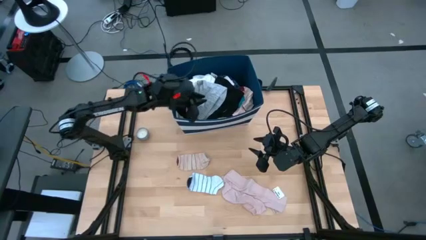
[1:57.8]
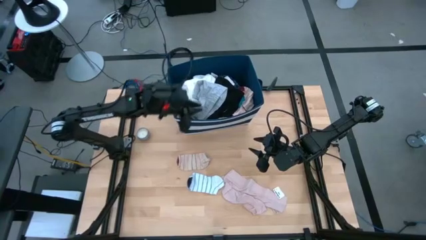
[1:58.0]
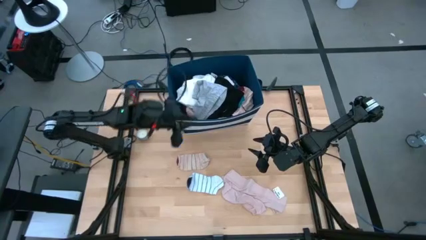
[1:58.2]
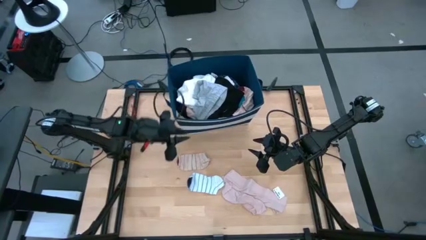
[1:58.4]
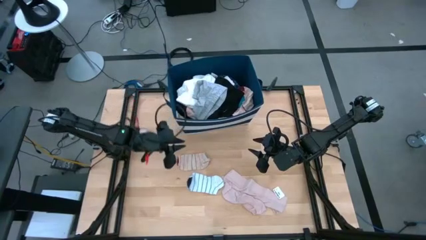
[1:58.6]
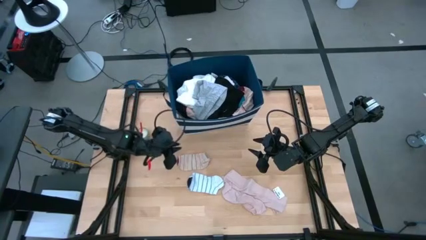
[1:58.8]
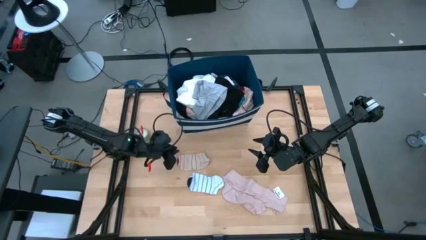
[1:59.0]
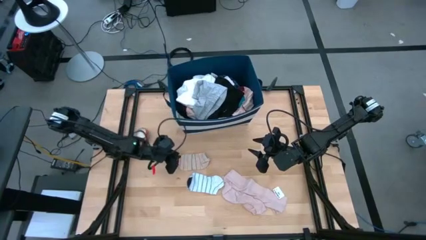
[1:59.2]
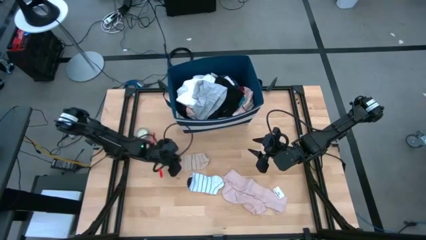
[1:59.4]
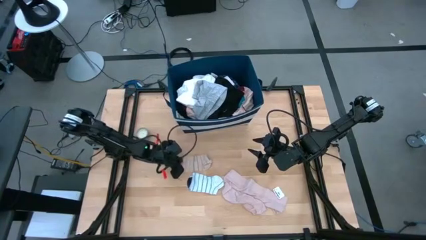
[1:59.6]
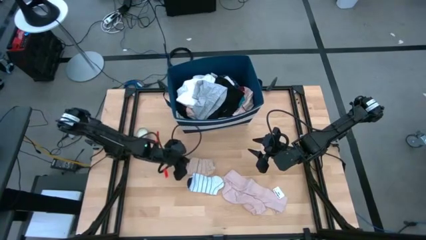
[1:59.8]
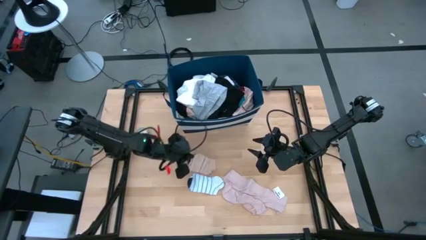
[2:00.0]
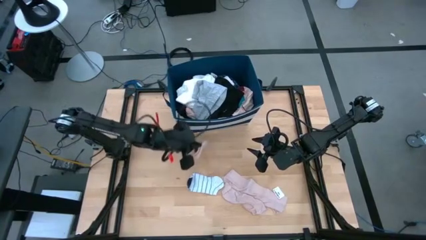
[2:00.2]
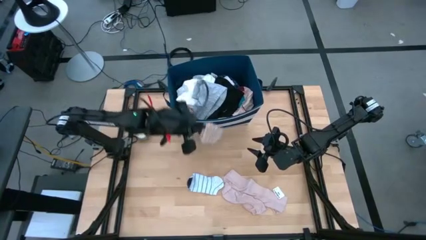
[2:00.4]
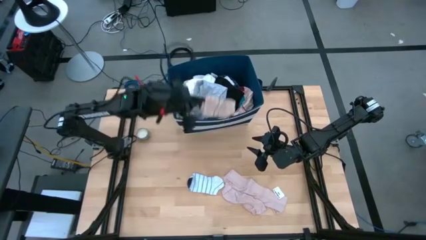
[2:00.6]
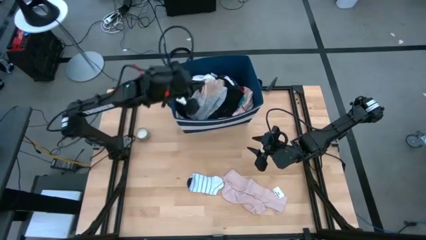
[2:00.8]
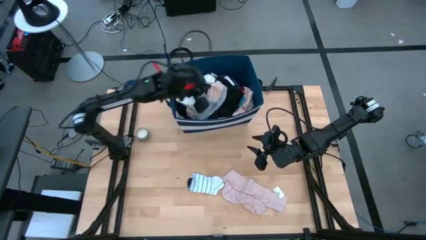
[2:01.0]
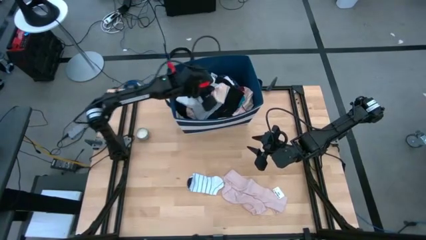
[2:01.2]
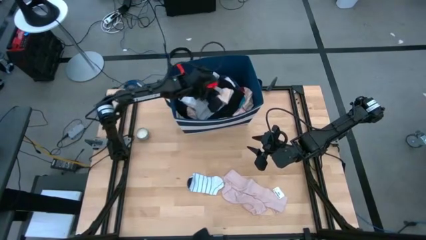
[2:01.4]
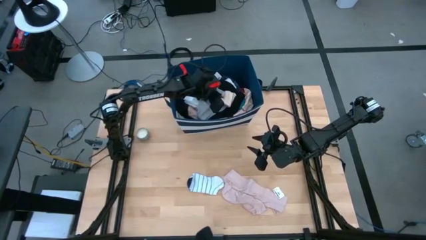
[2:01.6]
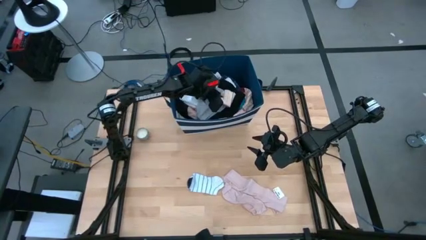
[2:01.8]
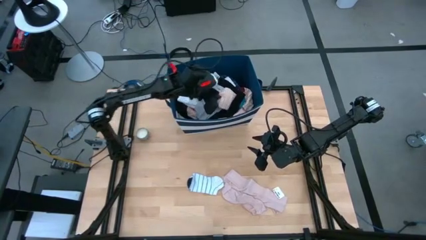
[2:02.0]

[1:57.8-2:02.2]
Task: Sort clothes
Put the brown patterned sock into the blue laundry bin

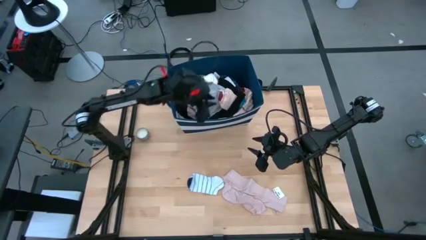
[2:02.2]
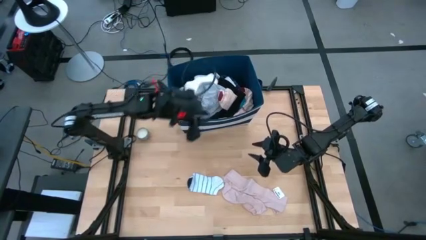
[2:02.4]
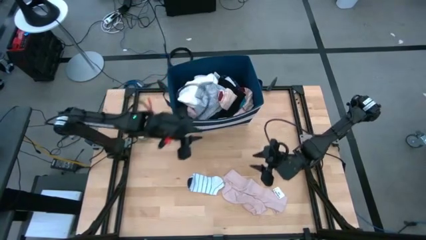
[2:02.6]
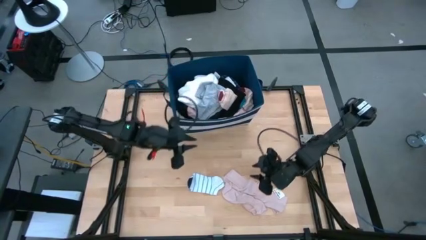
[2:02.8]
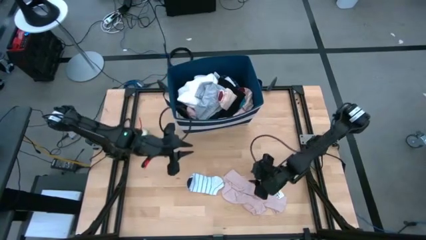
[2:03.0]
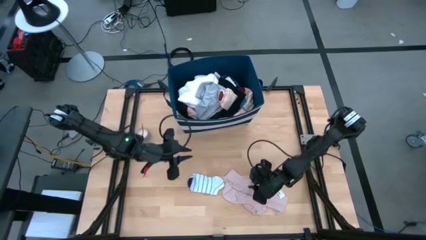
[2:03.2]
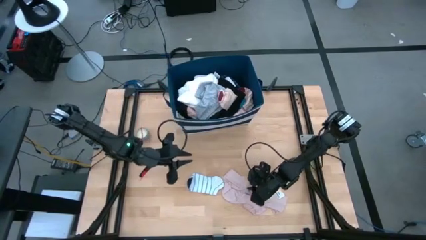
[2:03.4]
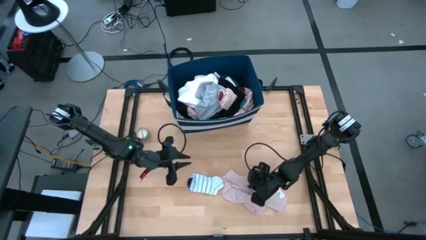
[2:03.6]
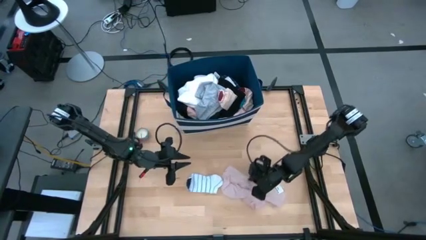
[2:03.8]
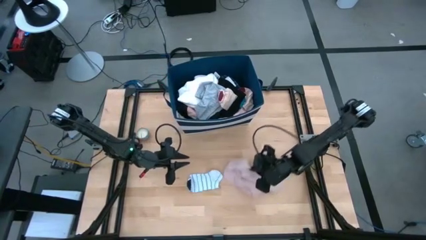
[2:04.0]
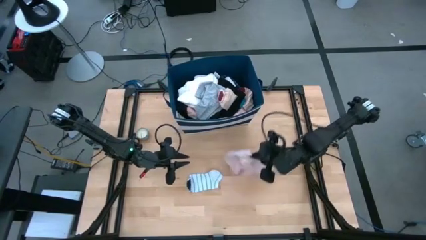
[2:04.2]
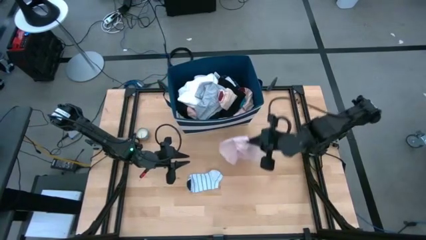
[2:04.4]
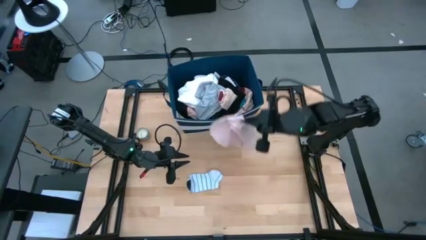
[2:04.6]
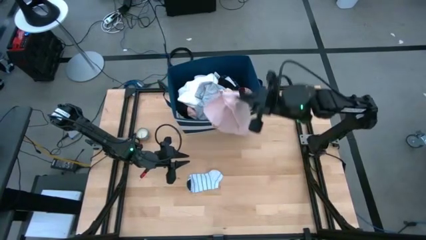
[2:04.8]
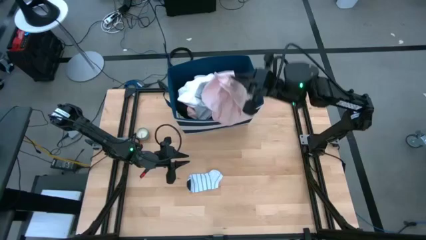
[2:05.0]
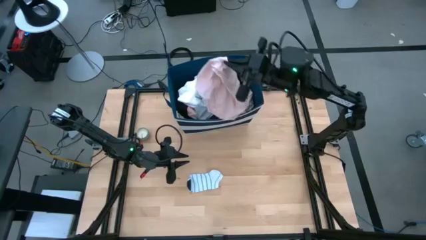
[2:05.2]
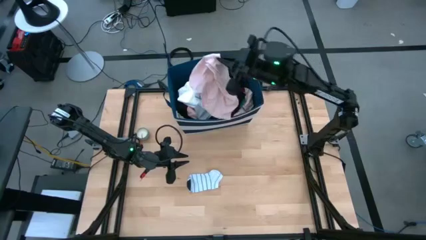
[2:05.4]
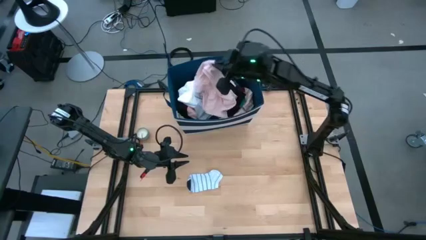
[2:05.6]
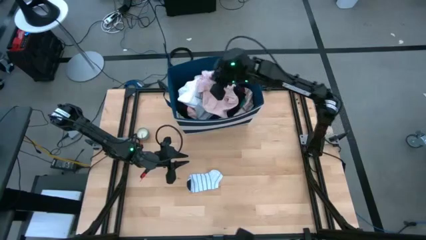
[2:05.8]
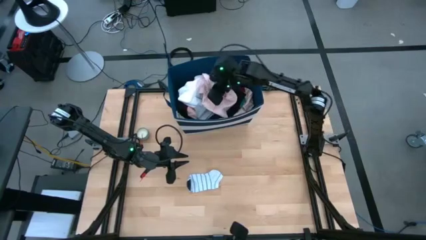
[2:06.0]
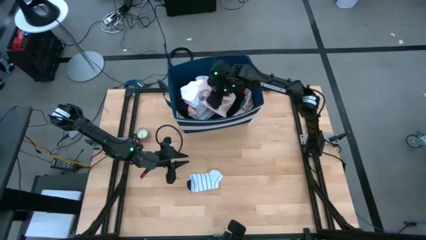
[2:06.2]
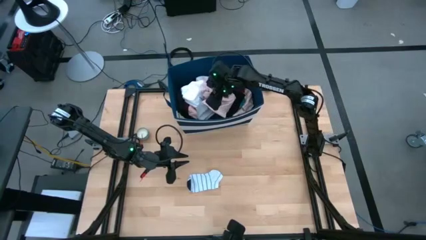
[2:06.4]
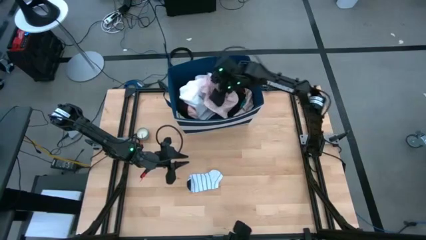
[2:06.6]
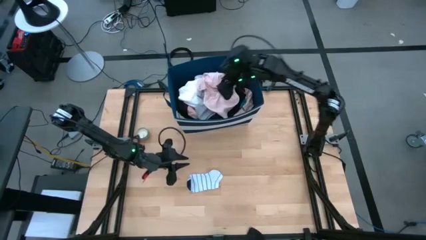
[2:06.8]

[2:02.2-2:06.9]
Put the light pink underwear into the blue laundry bin

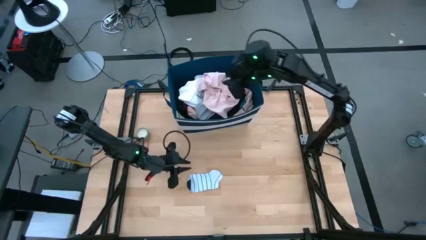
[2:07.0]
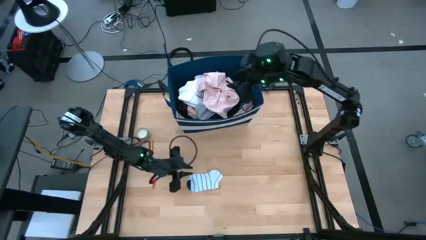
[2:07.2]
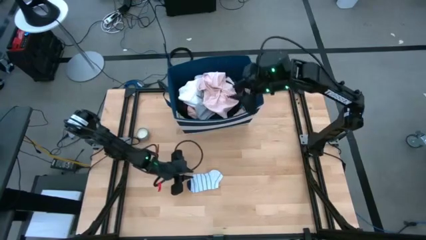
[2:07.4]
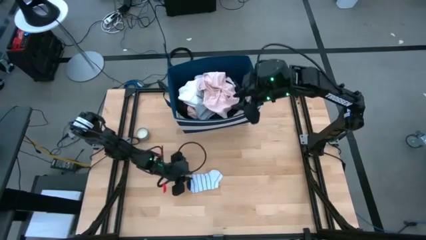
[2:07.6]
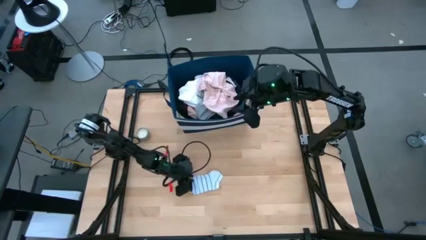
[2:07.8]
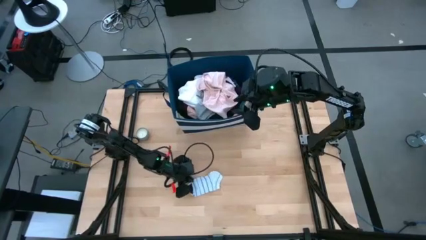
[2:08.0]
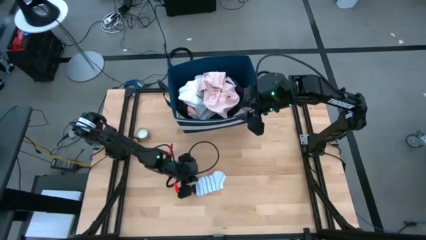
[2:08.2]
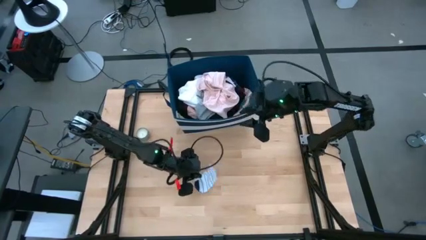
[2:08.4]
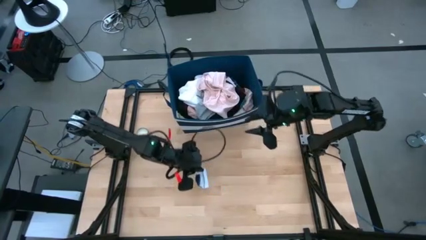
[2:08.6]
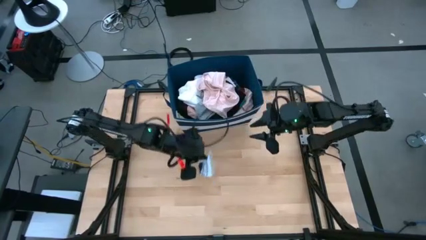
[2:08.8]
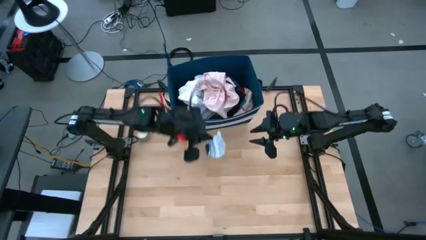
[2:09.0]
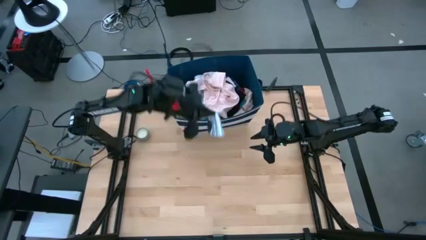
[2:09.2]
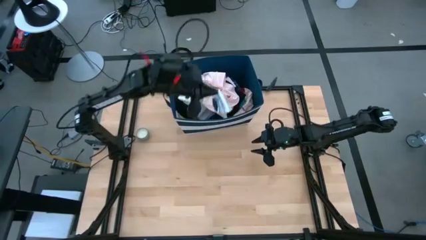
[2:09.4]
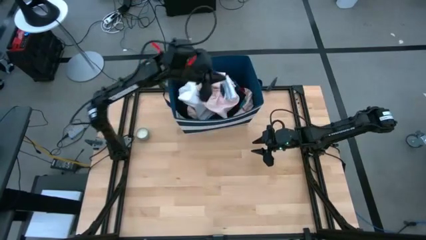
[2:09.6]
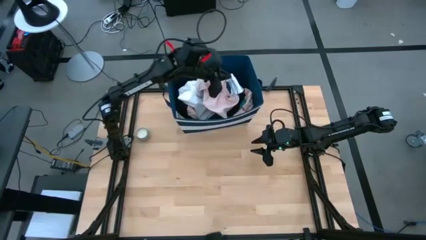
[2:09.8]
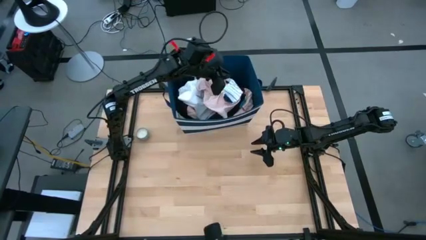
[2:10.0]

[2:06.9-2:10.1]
Put the white patterned sock into the blue laundry bin

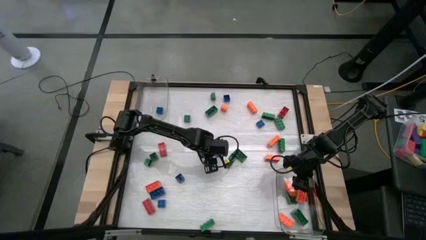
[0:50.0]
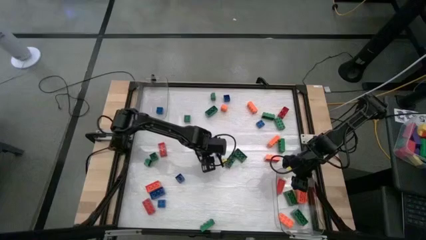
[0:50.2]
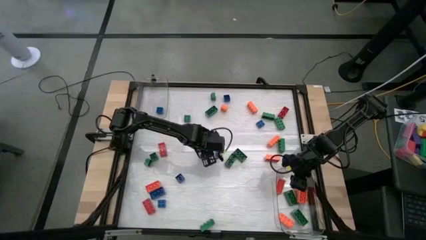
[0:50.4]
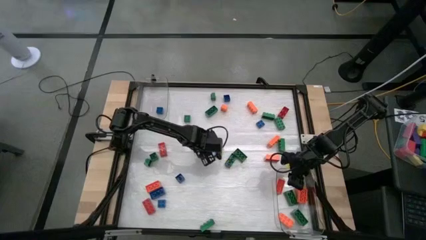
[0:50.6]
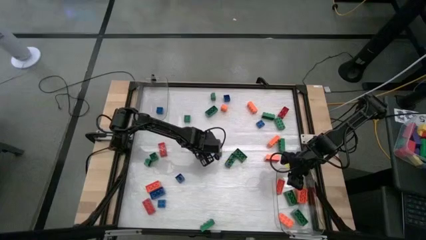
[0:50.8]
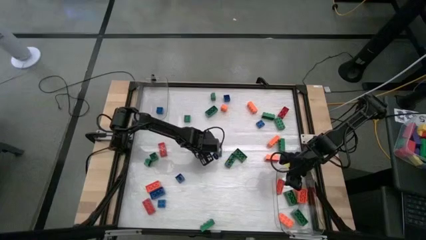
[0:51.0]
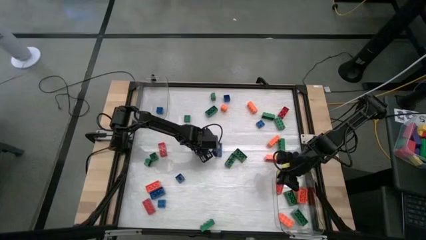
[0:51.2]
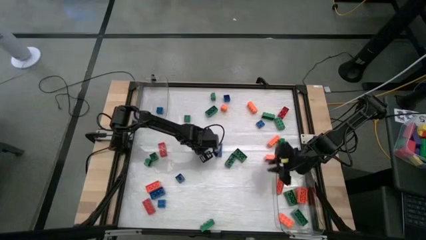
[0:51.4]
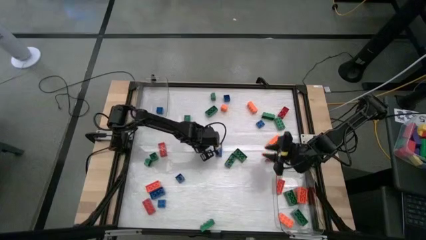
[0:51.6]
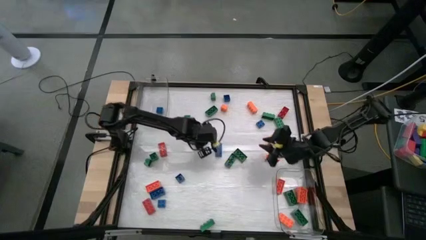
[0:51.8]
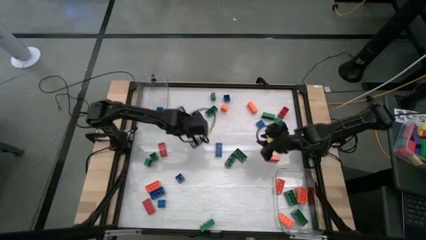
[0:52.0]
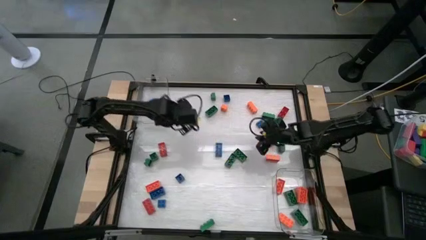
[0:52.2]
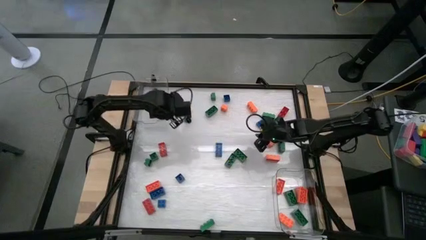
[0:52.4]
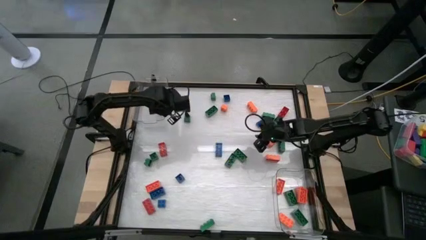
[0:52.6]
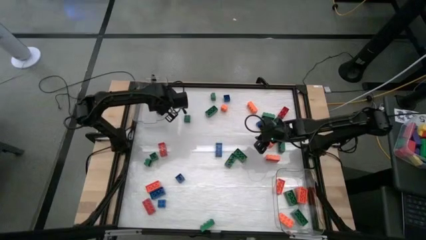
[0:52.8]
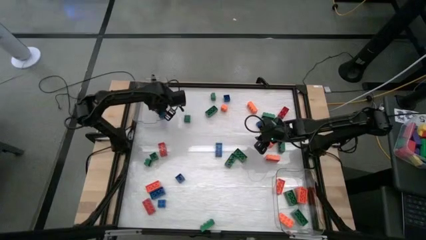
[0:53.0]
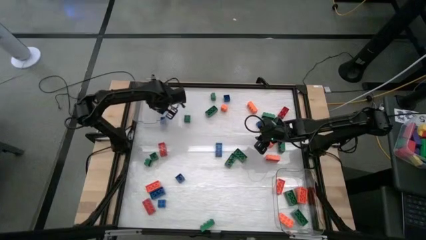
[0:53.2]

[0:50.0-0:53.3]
Task: Sort blocks by size
Put the 4 stud blue game piece into the top transparent bin

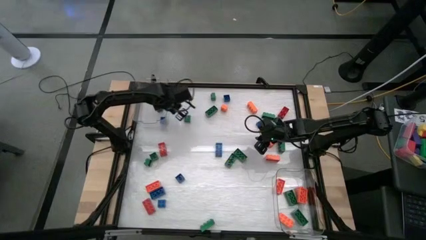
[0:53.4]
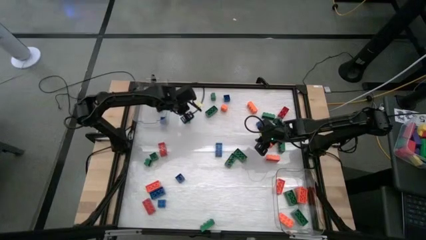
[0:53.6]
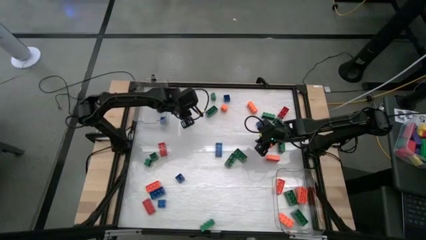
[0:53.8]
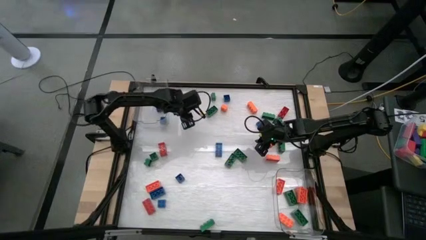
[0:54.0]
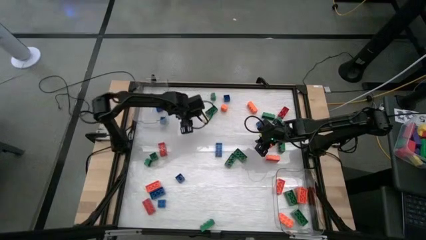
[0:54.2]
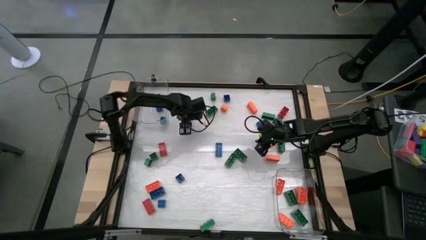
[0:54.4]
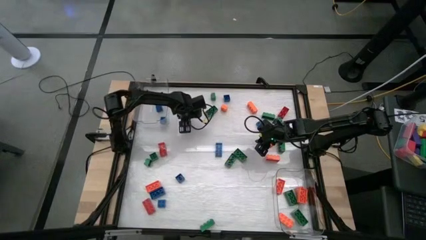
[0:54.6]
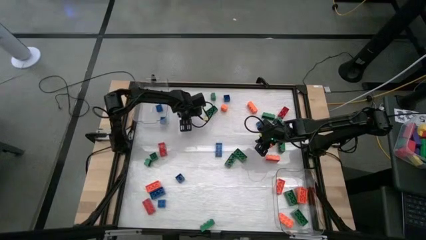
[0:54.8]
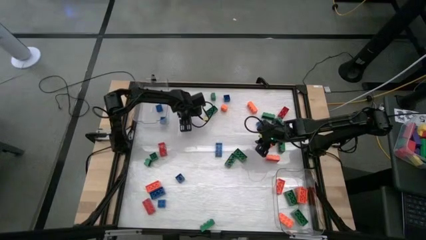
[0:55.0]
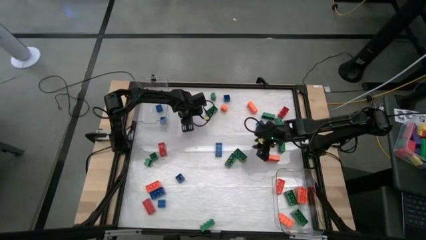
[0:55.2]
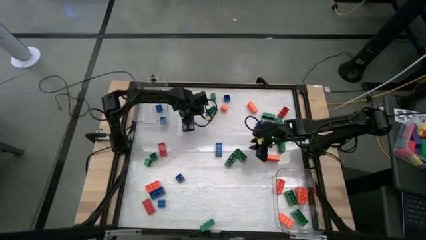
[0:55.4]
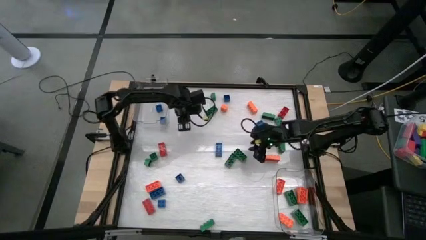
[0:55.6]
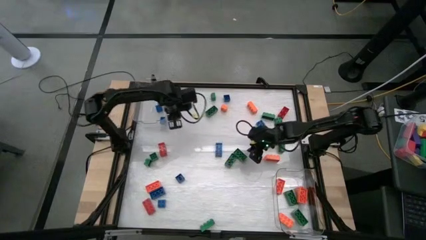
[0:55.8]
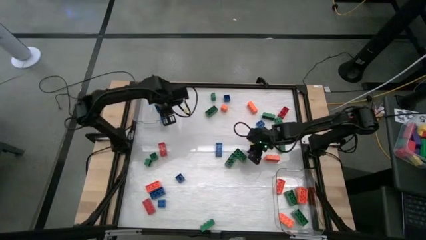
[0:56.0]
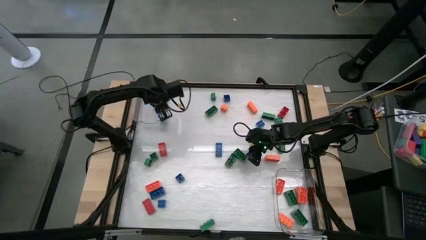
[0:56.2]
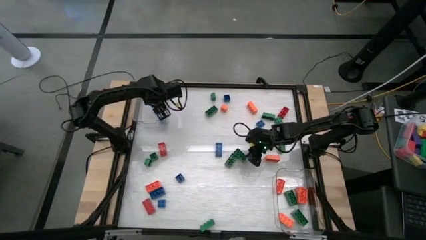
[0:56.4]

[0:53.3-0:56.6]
Put the 4 stud green game piece into the top transparent bin
